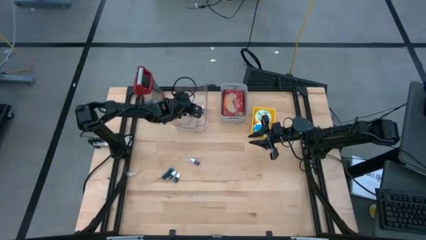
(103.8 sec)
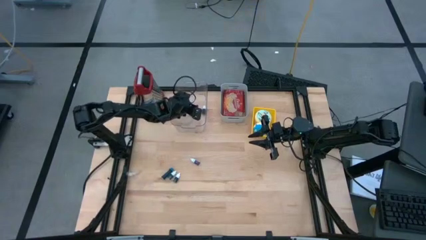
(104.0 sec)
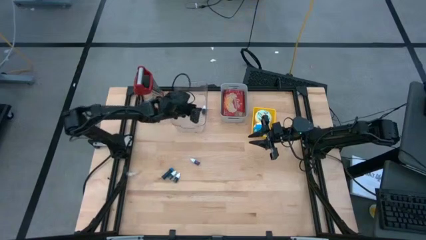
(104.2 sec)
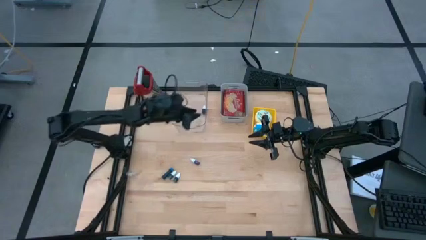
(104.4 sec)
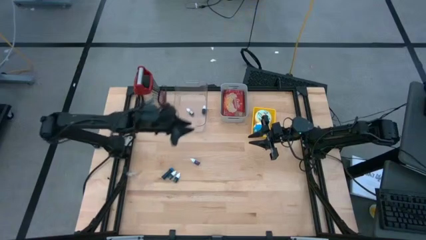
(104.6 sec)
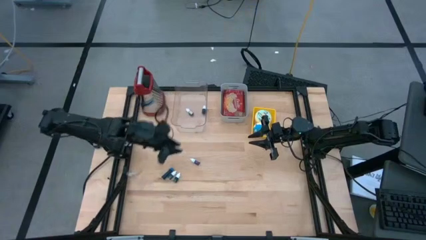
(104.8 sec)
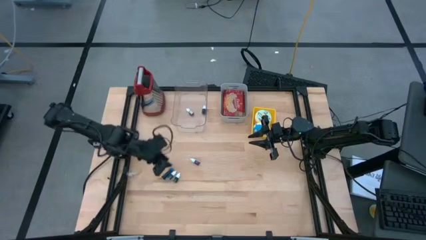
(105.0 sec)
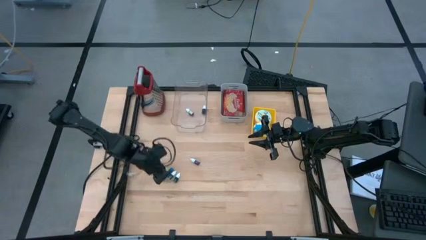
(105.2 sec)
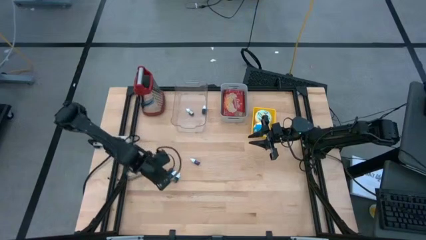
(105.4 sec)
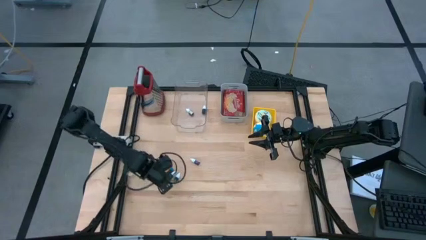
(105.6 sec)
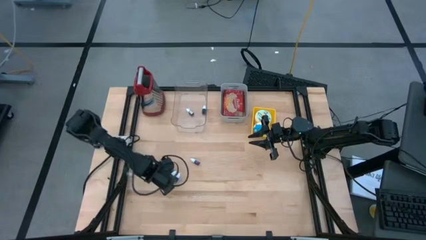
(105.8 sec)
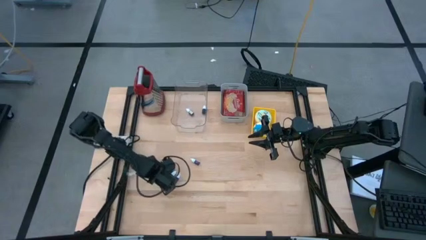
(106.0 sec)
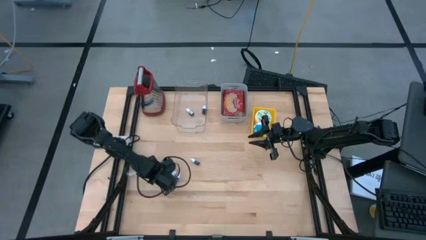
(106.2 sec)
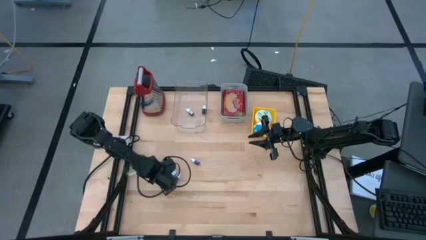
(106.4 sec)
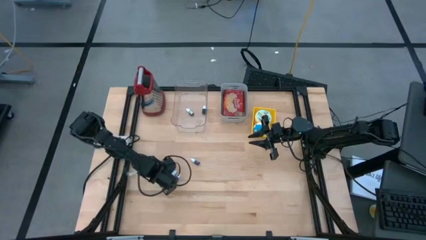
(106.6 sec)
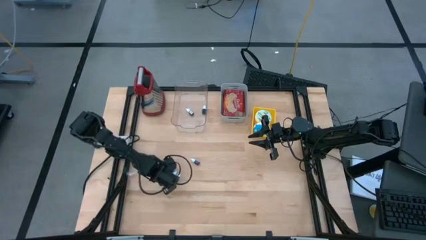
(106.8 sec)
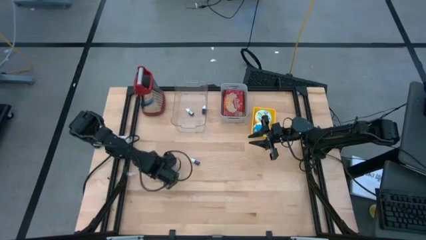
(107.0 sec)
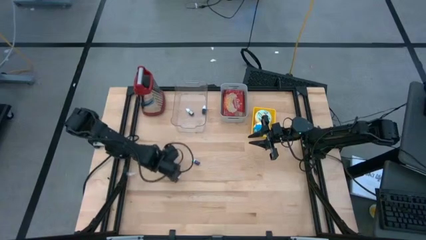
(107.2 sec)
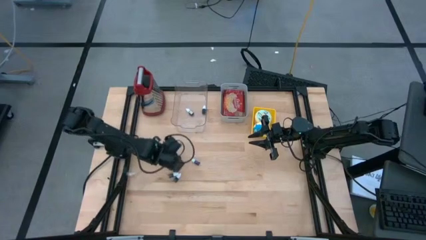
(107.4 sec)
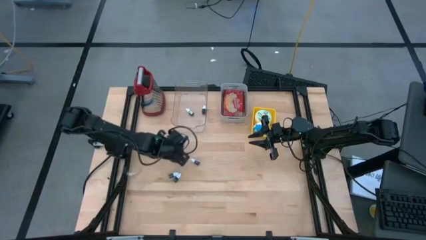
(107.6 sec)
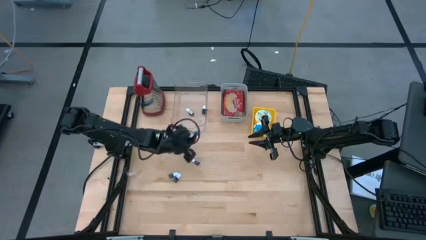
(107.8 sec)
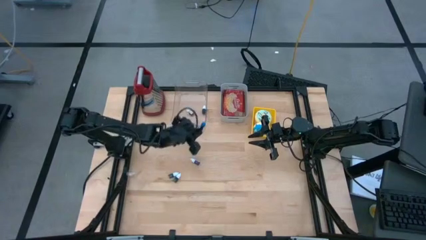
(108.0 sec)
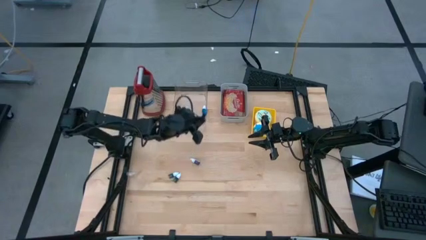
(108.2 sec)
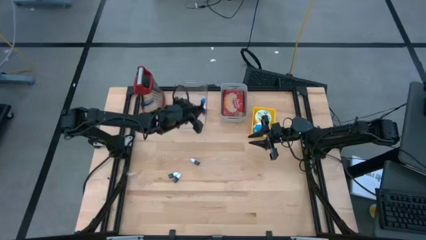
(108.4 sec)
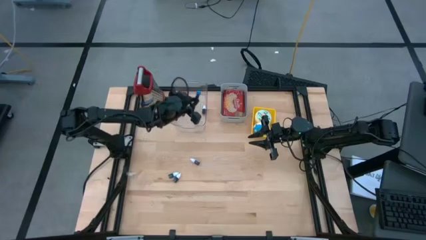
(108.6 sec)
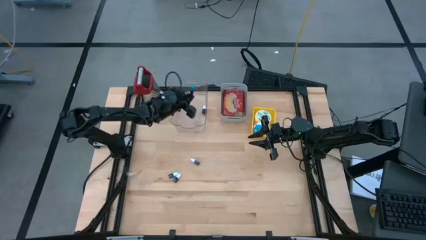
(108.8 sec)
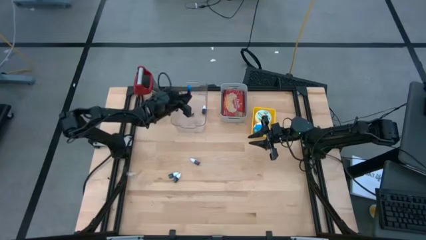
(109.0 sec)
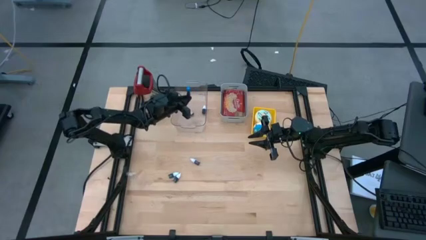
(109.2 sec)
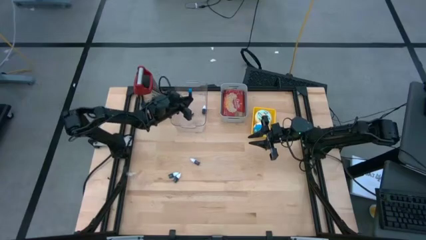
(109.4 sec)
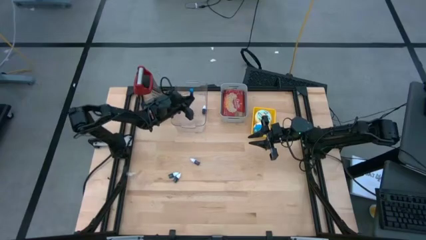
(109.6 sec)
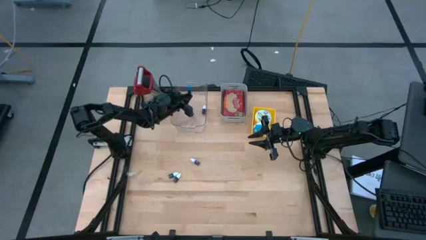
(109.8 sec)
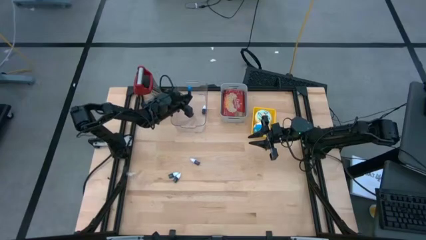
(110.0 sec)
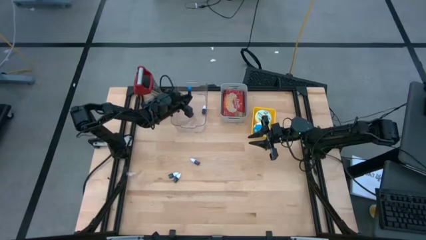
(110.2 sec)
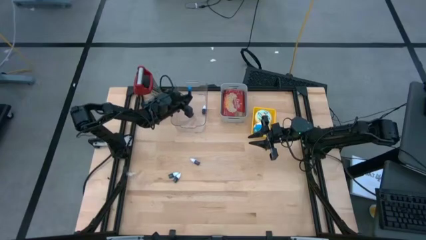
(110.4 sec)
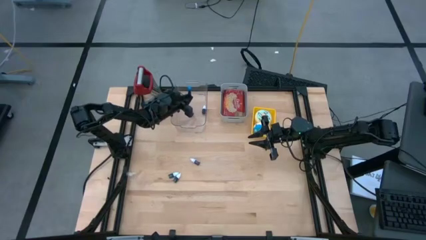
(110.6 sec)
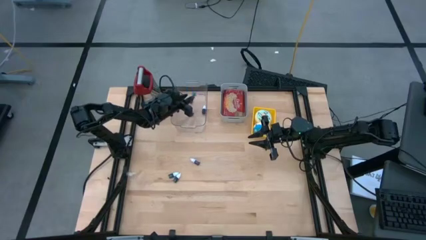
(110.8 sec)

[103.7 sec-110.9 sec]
Task: Pick & Place Food Item
Put the blue food coloring into the transparent bin

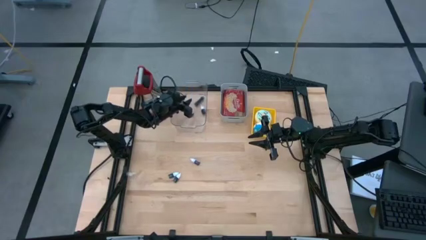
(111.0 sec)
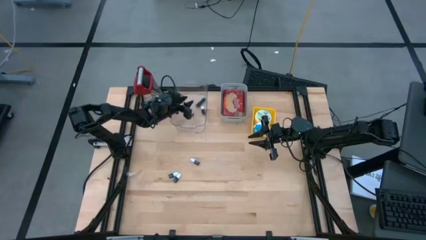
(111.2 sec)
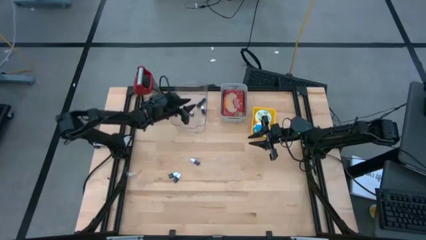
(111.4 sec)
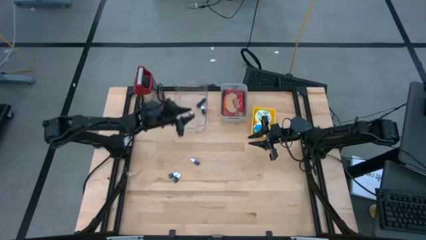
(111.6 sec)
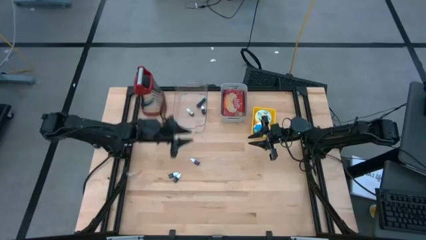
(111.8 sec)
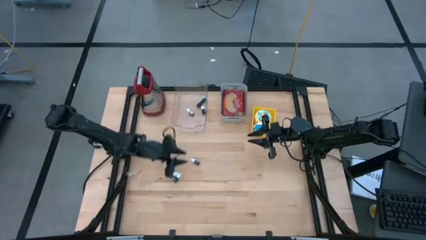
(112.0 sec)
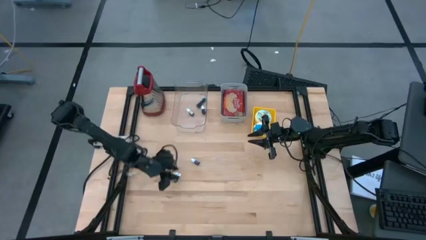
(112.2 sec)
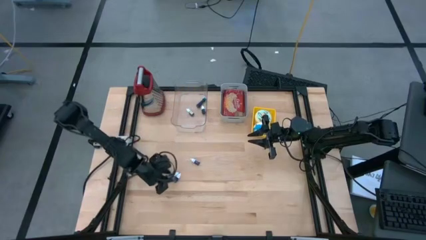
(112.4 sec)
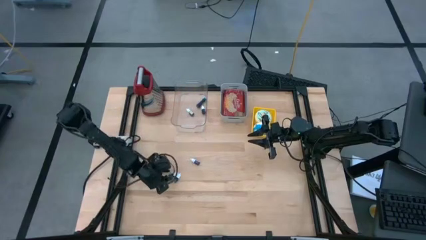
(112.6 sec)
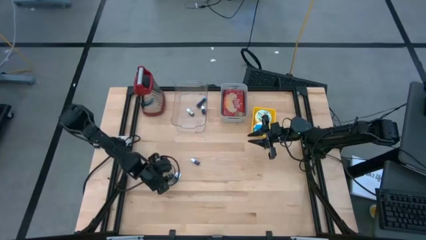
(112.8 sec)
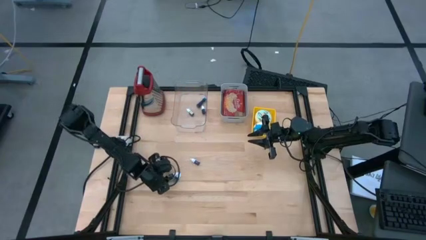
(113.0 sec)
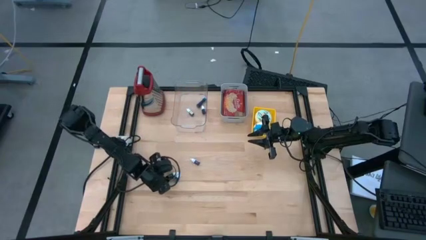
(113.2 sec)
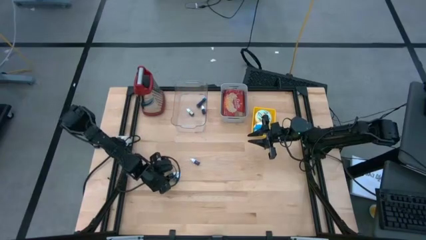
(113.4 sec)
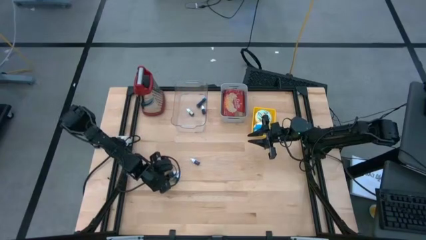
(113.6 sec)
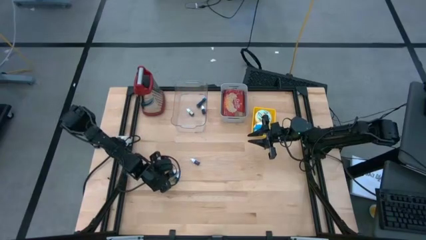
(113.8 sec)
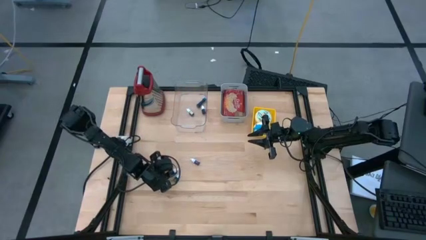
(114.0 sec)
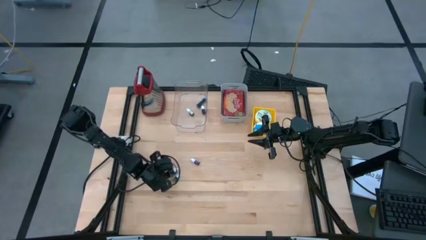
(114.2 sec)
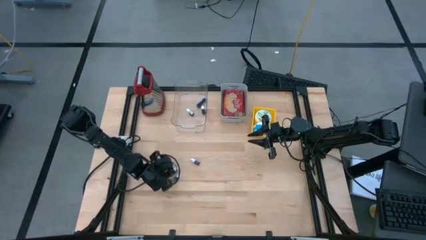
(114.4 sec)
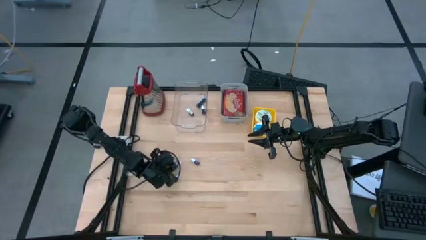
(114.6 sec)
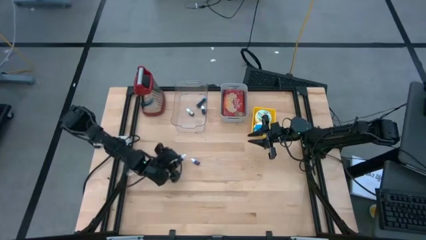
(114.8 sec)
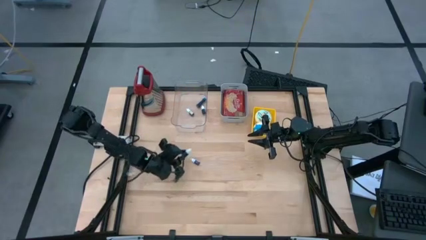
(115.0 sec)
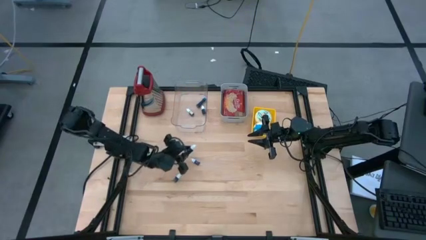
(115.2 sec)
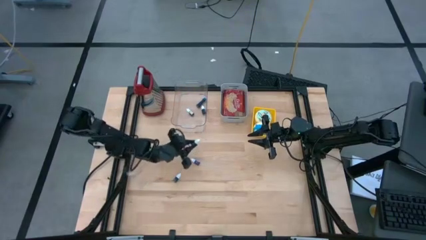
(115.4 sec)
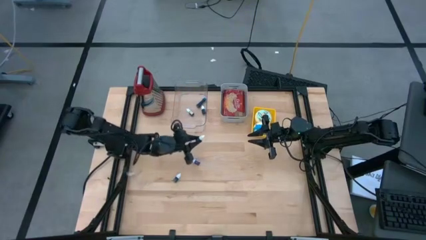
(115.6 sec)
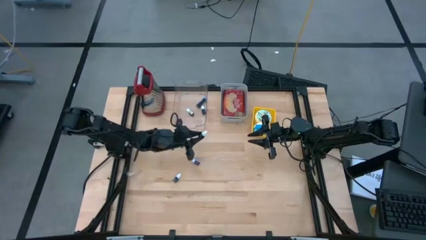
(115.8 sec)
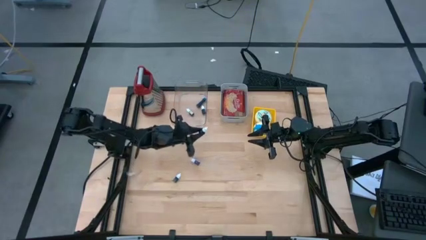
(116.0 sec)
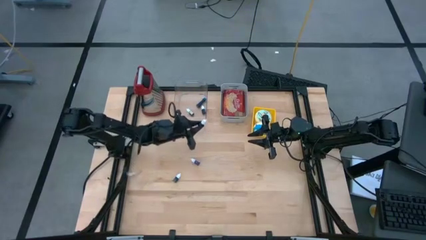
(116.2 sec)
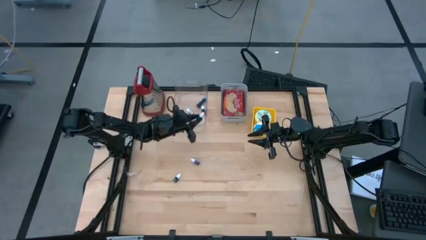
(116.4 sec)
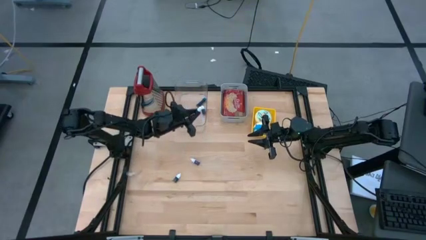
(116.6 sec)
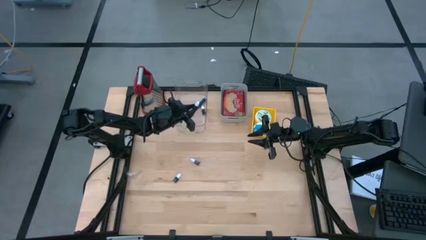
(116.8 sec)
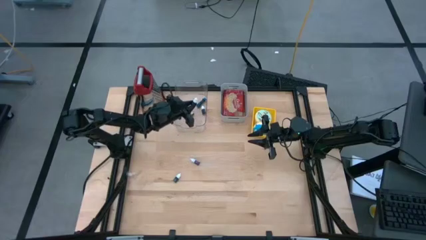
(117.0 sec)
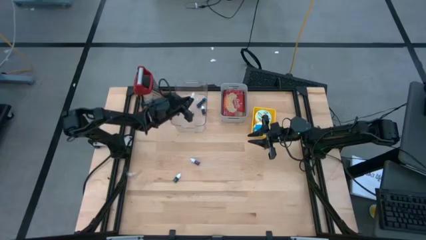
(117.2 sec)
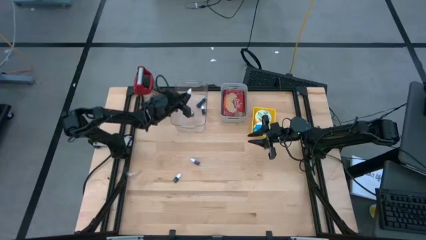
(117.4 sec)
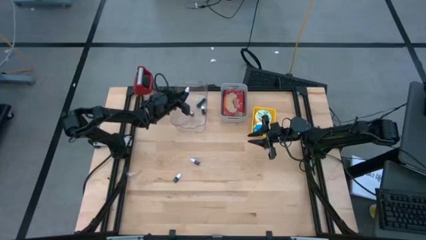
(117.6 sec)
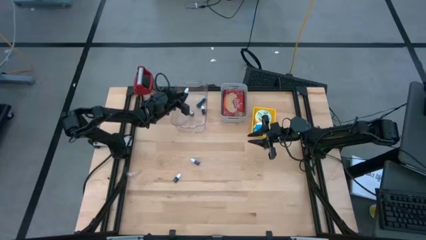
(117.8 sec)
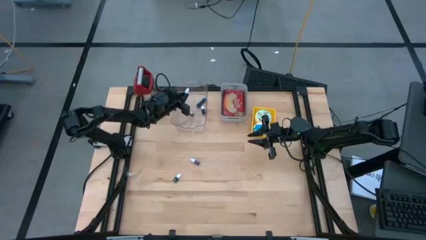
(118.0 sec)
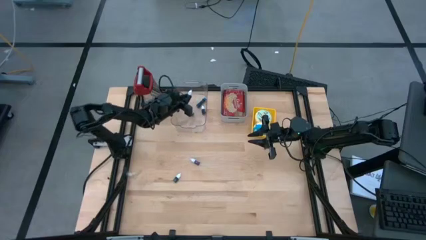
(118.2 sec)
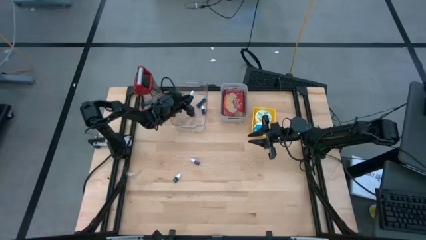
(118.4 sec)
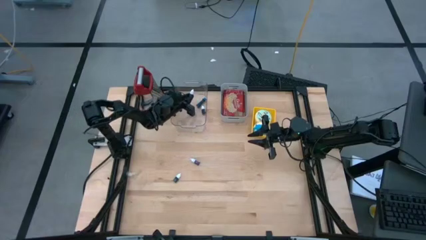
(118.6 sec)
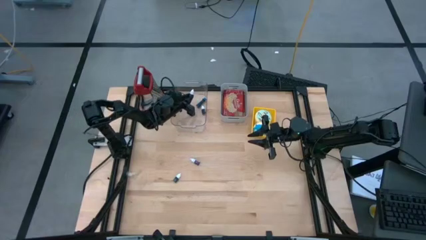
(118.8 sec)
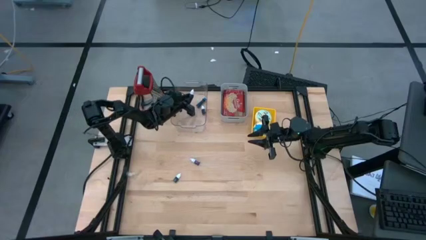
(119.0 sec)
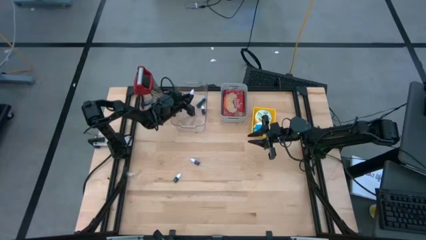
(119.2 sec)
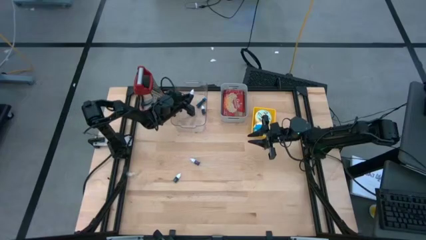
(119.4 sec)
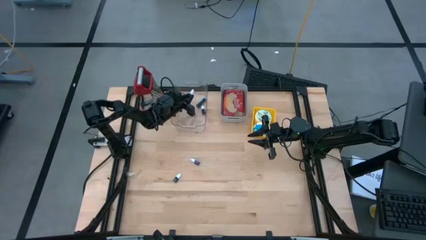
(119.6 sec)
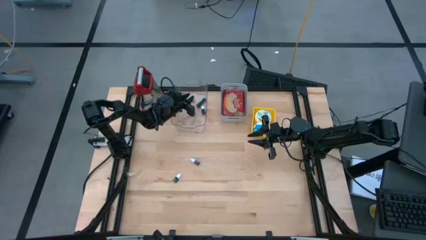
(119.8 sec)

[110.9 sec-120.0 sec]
Put the left green food coloring into the transparent bin

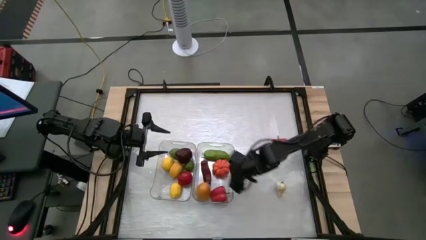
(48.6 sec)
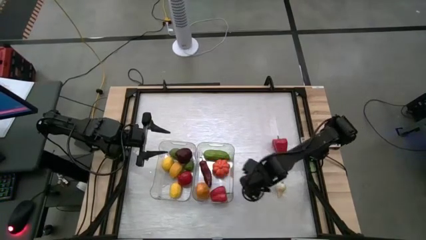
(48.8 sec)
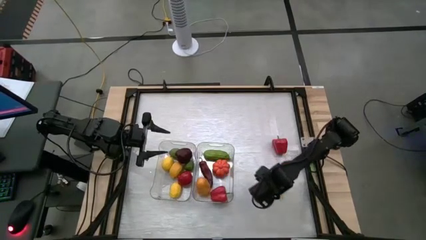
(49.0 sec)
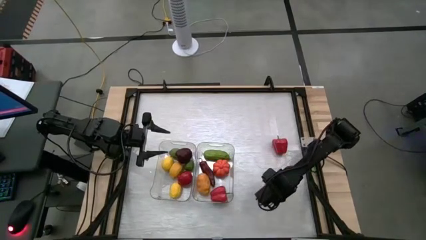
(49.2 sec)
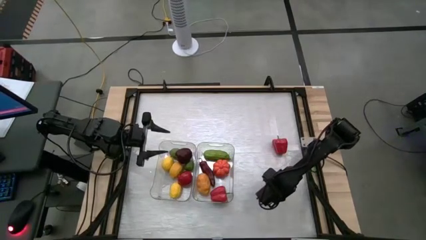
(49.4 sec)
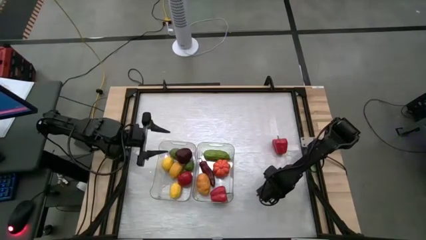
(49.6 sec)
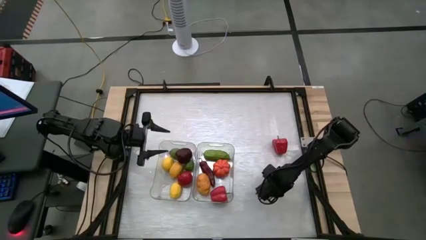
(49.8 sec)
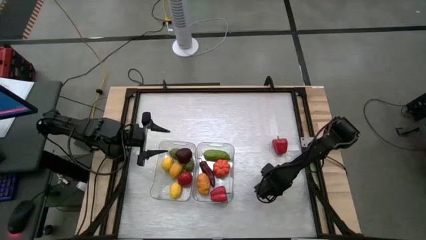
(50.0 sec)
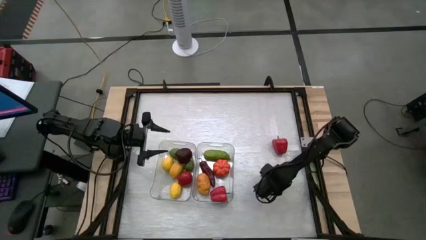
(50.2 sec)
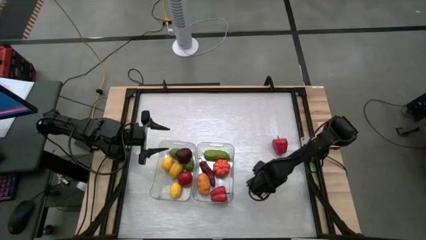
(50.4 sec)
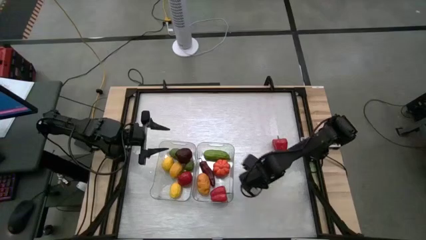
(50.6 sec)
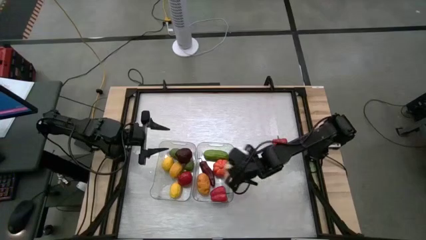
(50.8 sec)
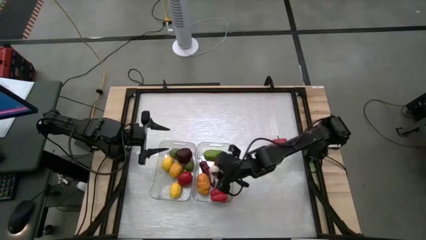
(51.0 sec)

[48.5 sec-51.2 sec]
Task: Sort produce into baskets
Put the garlic into the right transparent bin
